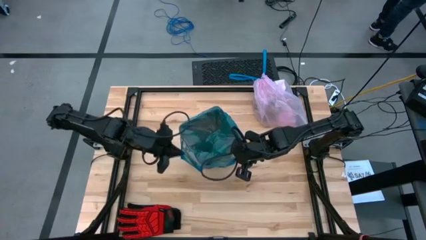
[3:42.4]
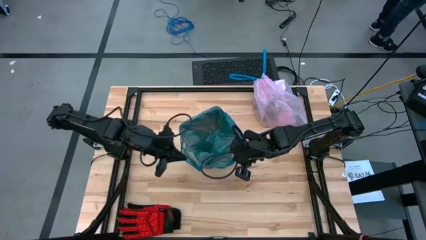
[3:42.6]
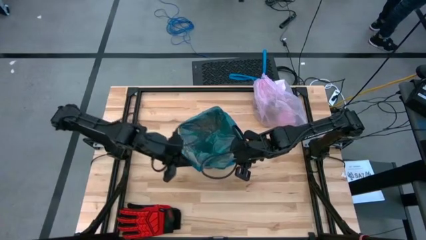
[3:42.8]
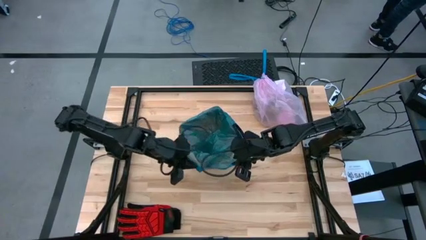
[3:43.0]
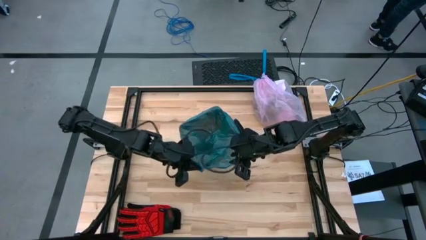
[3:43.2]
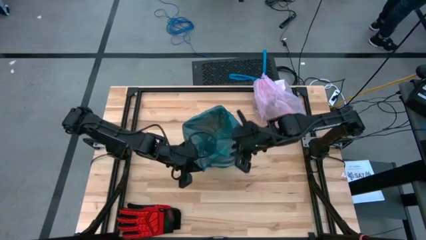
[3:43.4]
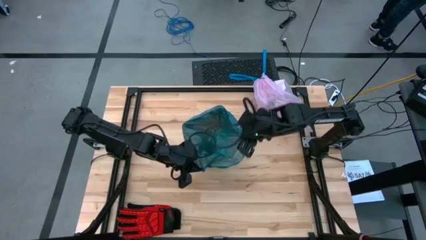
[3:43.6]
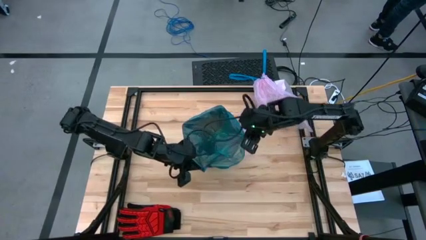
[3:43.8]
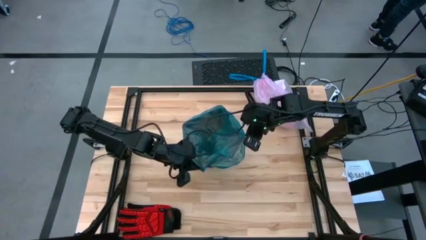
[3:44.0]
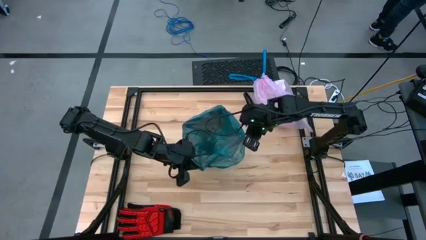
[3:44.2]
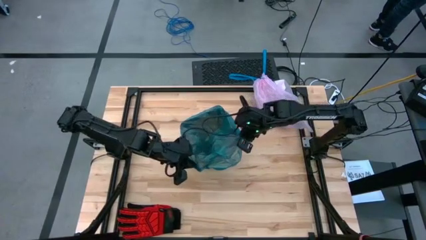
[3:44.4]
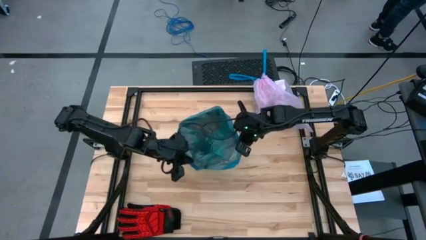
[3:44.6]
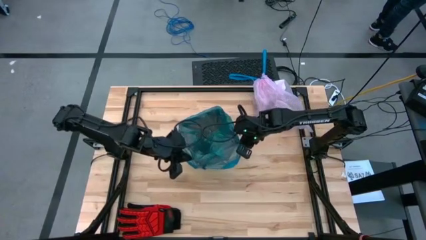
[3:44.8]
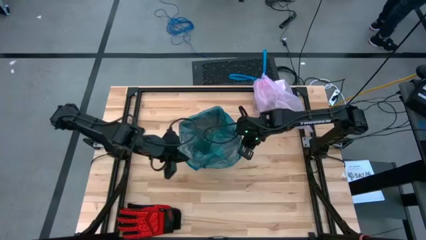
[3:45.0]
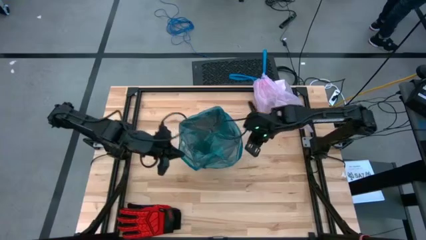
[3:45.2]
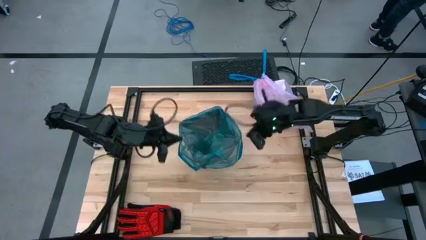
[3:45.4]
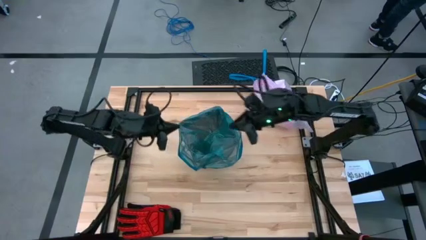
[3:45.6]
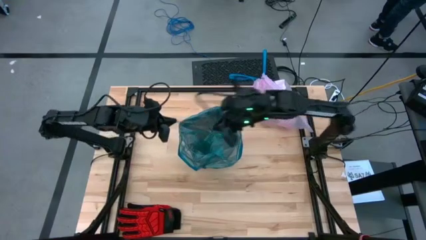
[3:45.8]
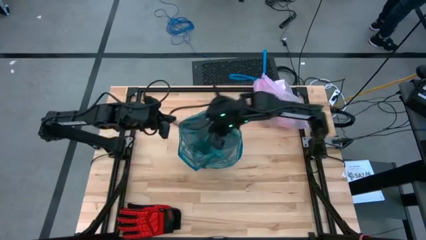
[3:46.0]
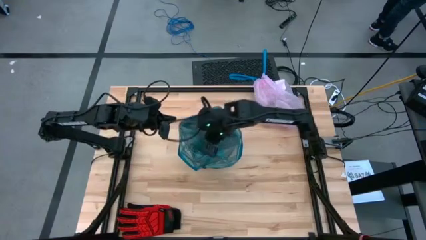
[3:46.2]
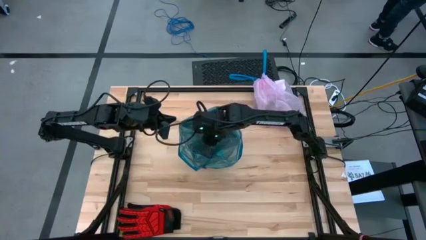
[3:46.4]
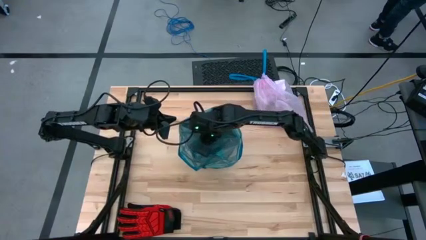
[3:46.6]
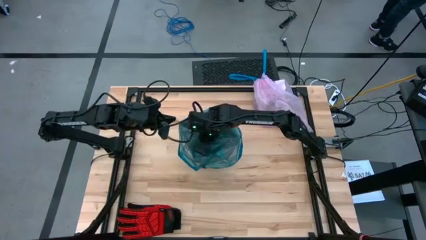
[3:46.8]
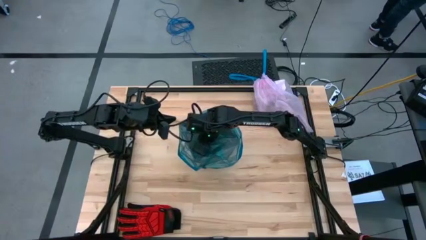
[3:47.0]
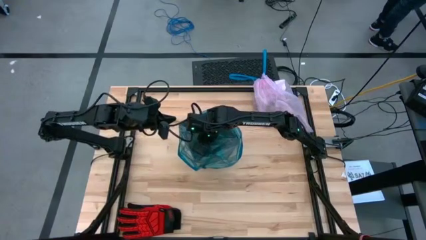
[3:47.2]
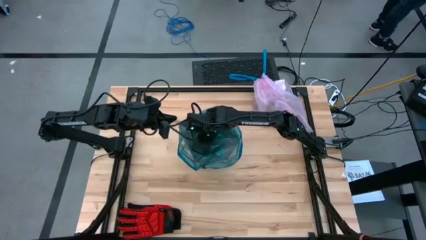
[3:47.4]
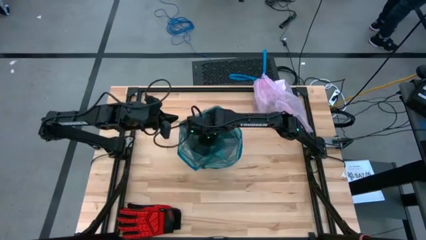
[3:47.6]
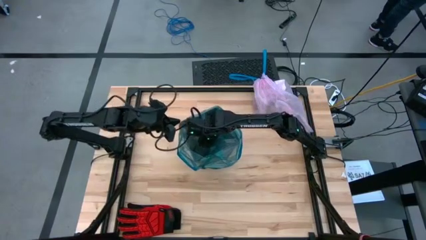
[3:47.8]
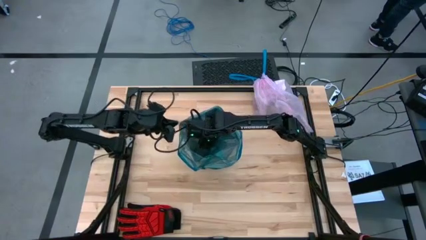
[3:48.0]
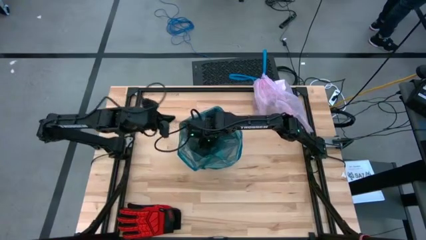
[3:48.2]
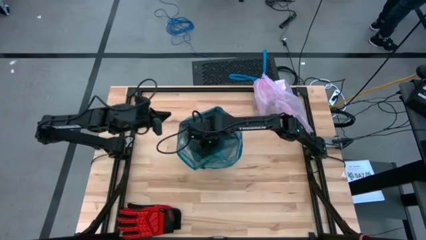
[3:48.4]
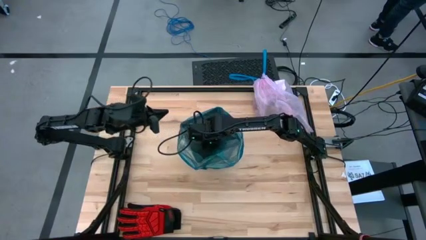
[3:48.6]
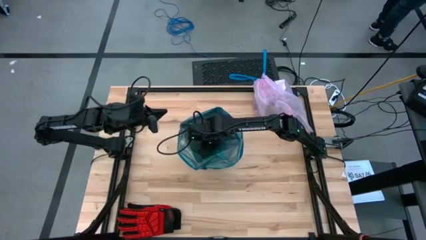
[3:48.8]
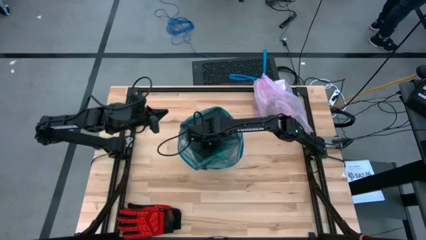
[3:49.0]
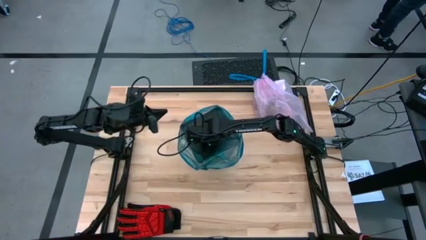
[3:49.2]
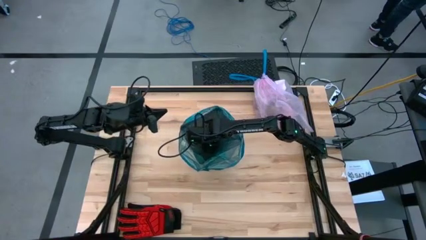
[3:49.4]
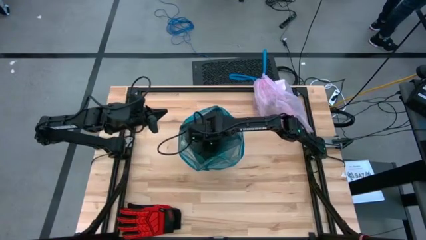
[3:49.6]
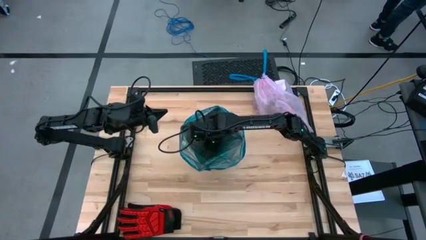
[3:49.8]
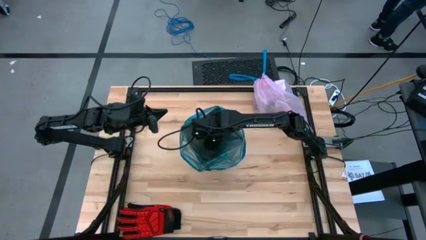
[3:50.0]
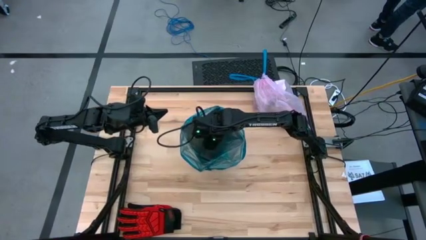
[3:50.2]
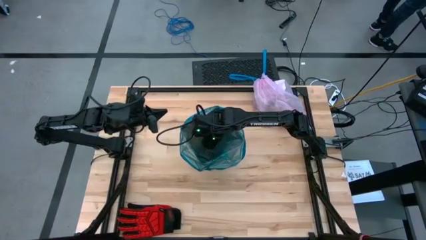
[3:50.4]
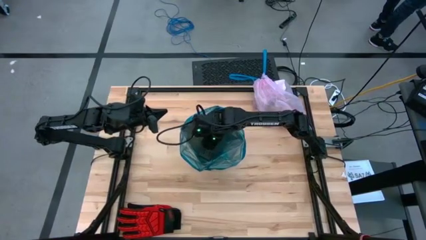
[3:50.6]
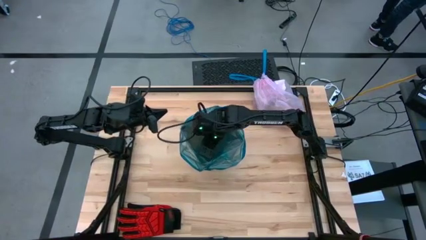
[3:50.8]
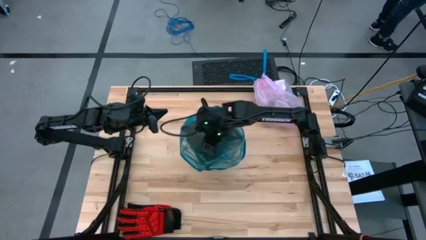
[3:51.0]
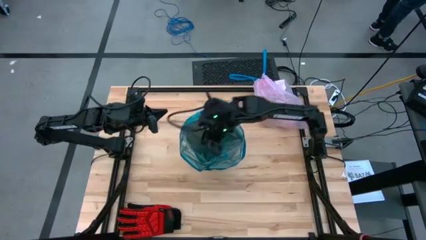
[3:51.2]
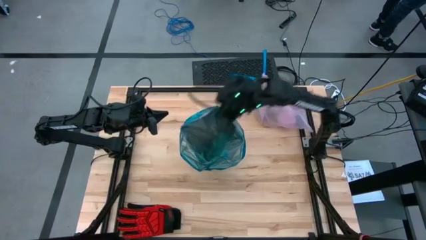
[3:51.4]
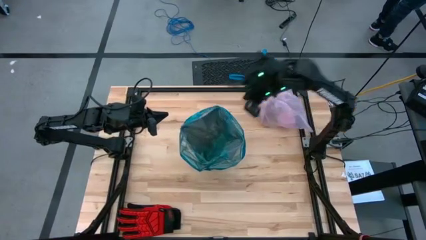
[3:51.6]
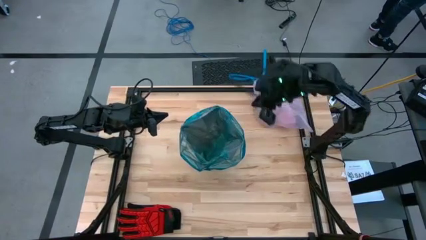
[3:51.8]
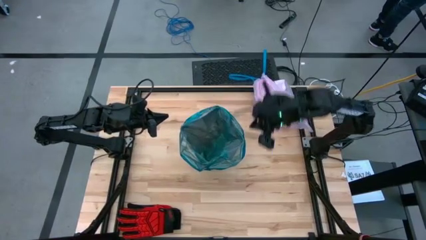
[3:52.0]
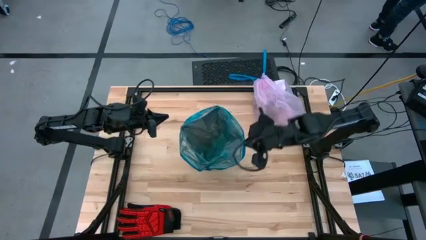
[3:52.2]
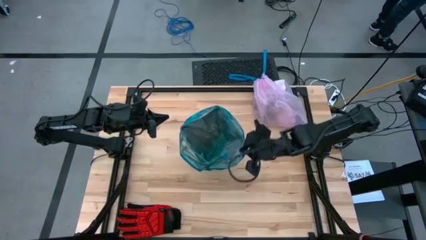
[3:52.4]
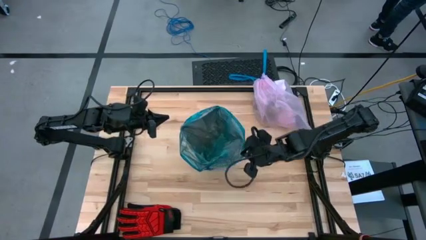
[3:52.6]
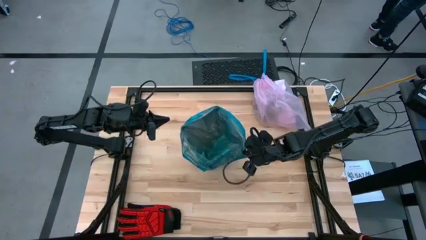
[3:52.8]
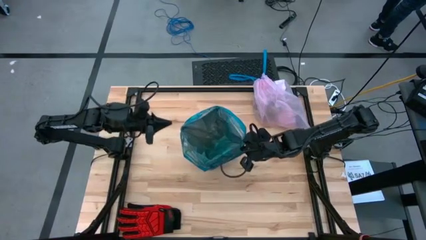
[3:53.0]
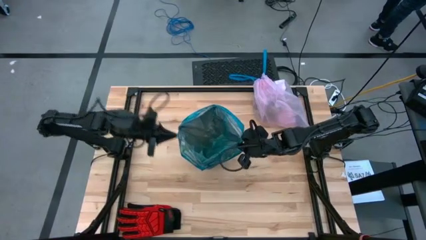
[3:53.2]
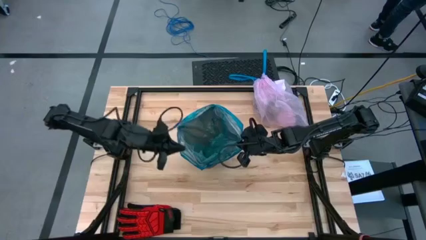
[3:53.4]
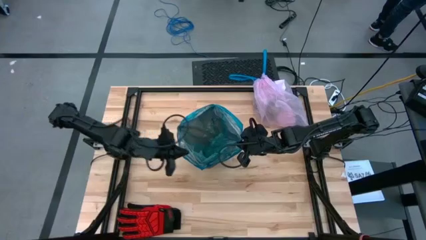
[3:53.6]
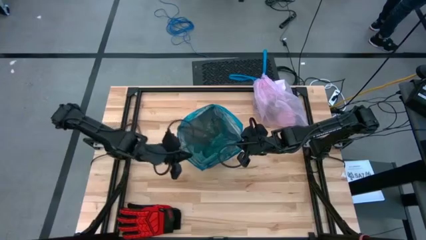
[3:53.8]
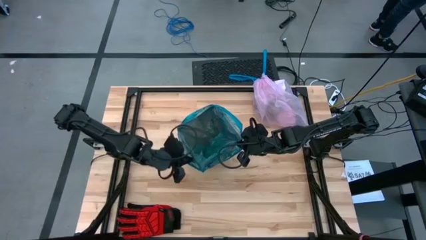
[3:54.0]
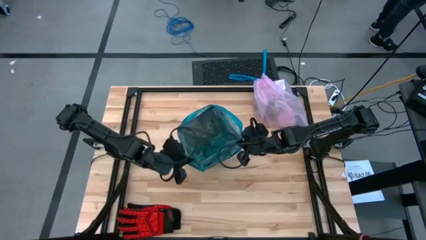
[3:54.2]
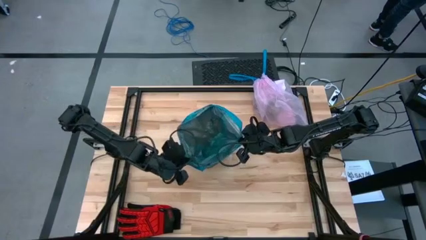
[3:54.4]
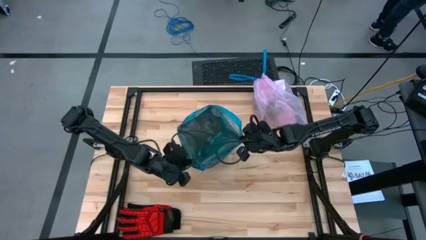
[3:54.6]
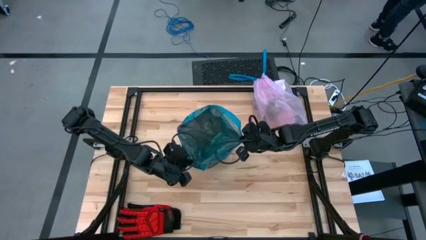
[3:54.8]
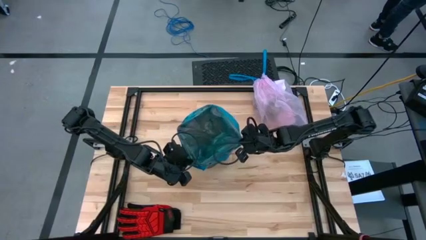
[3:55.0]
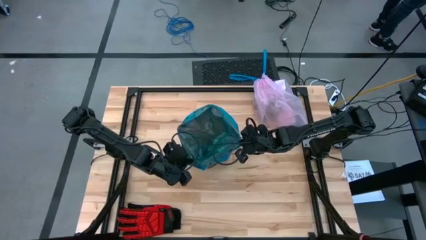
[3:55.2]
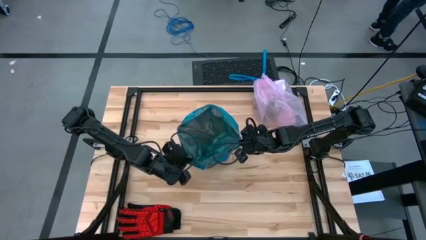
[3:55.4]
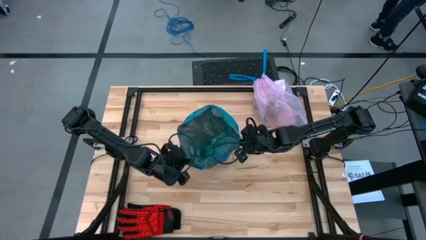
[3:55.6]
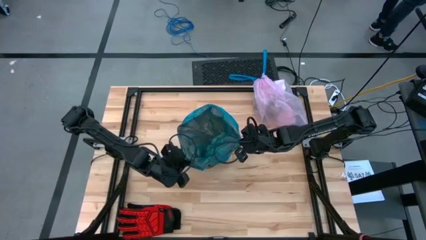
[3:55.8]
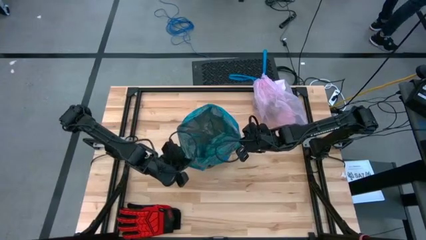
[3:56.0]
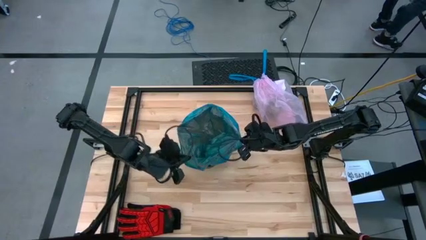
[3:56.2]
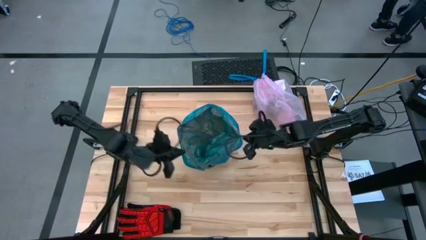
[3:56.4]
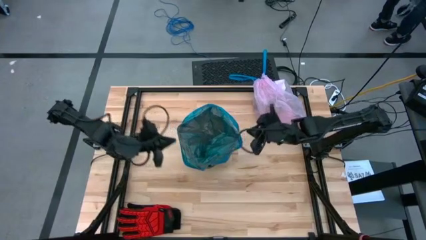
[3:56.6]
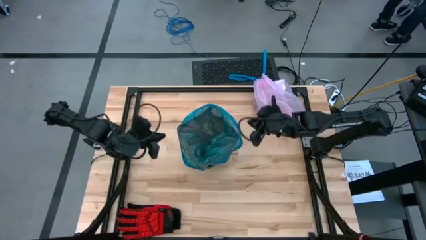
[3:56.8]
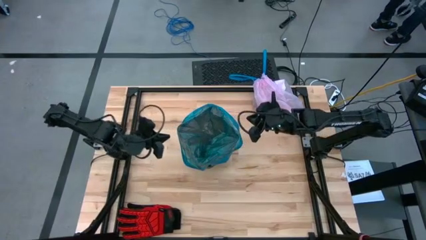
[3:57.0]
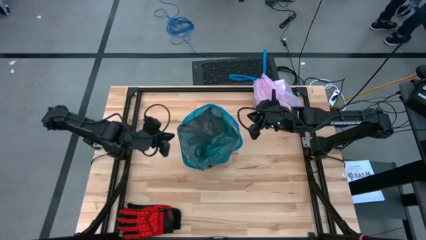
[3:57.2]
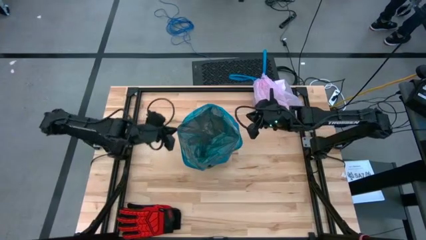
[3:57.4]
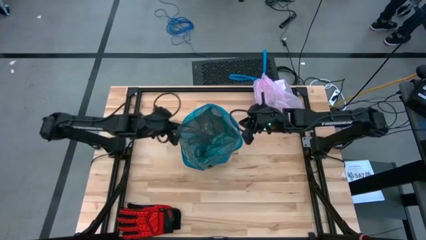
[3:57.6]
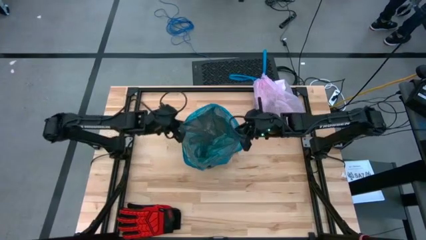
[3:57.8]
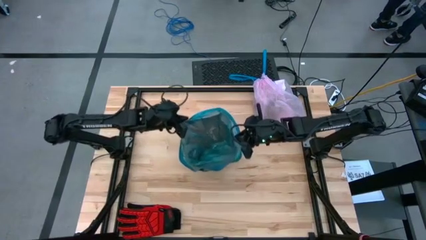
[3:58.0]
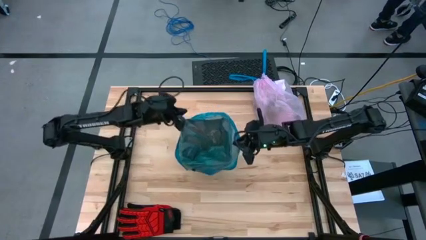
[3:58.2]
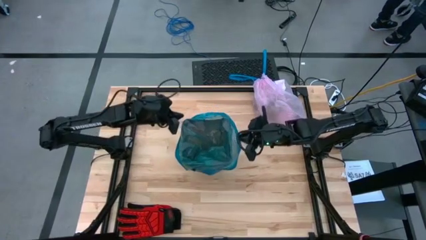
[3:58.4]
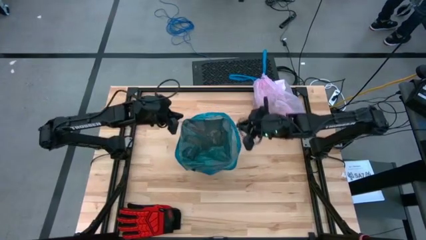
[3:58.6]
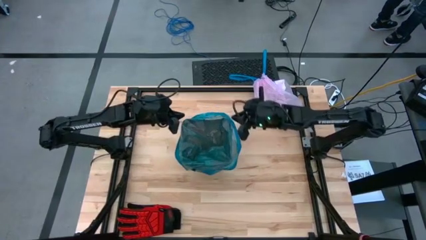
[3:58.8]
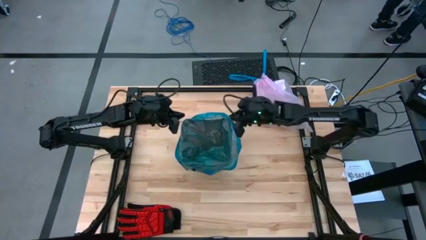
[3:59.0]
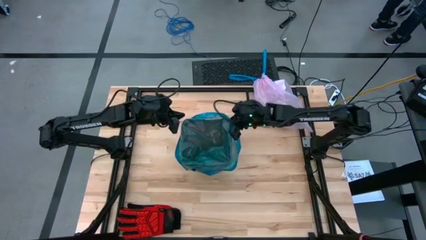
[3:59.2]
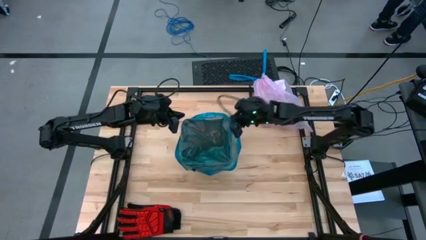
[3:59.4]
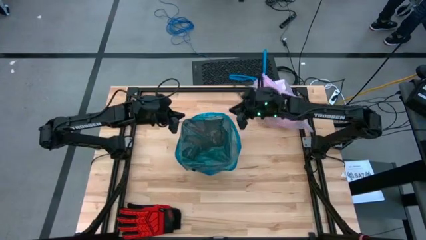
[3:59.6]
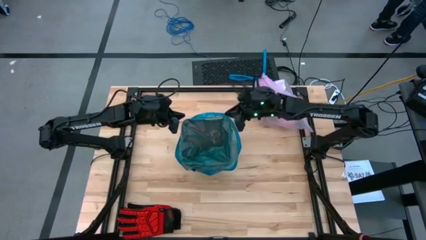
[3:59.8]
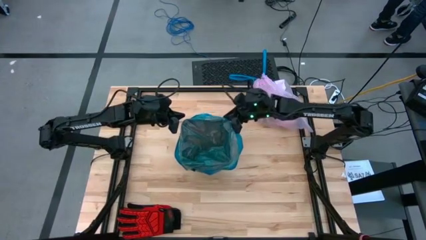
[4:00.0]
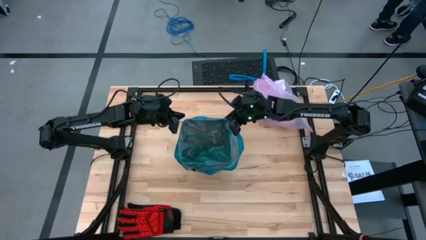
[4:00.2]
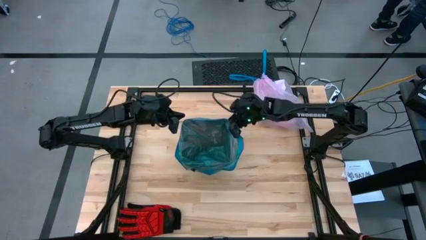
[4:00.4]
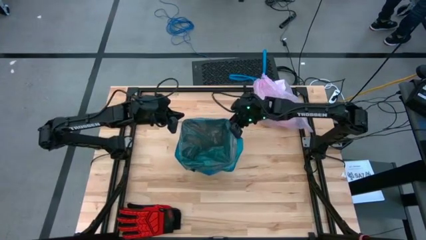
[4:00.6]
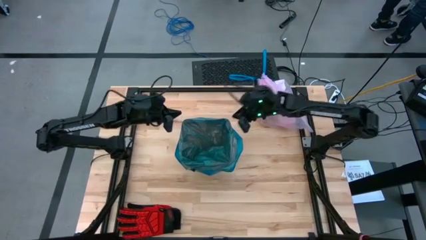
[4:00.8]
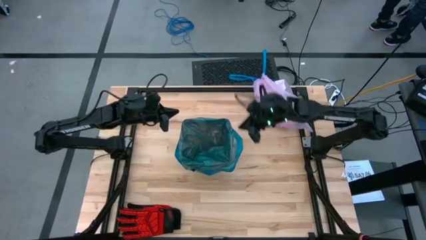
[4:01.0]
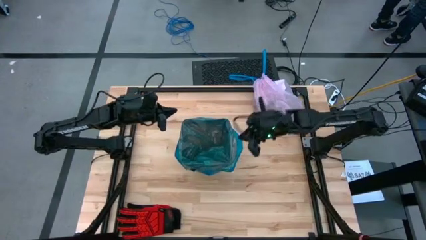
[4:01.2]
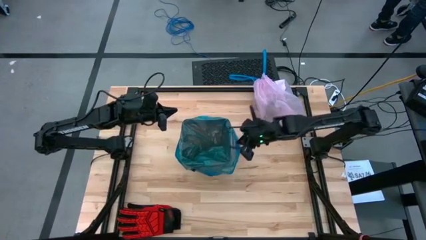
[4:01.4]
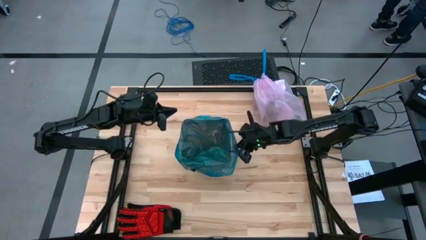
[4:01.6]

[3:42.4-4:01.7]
Task: place trash/remove bag and relplace
Insert the blue trash bag into the black trash bin
